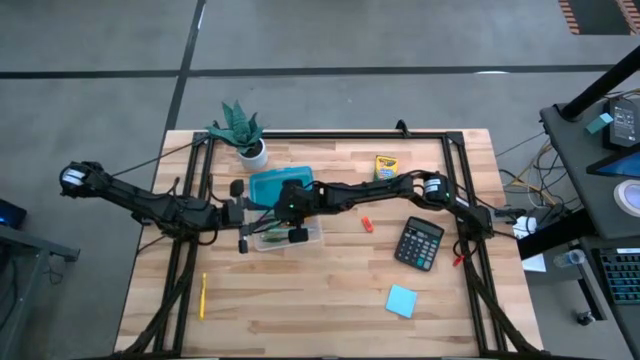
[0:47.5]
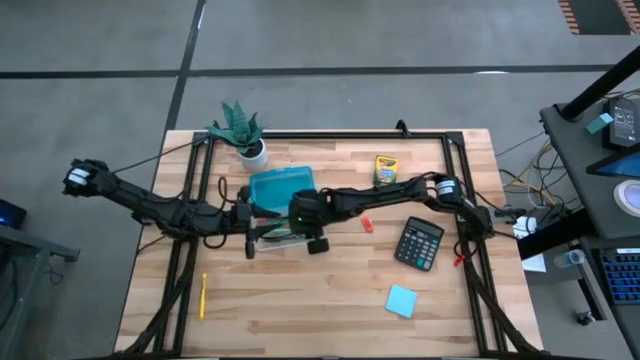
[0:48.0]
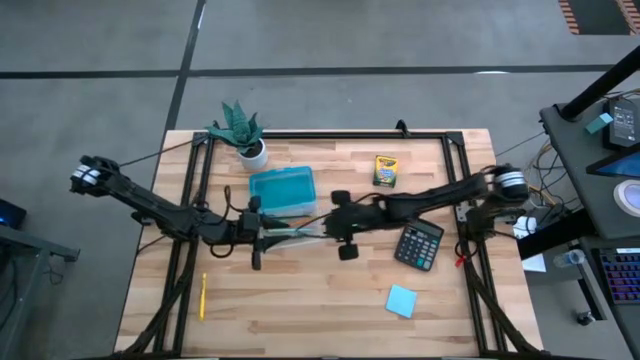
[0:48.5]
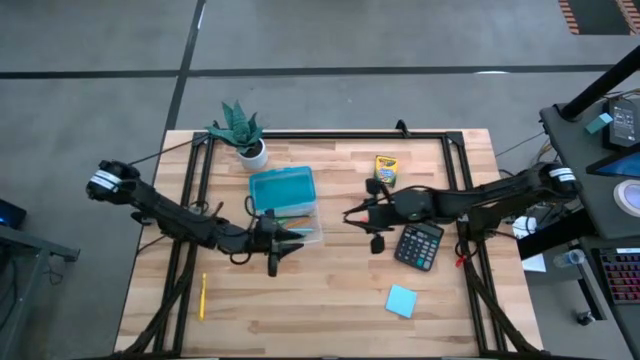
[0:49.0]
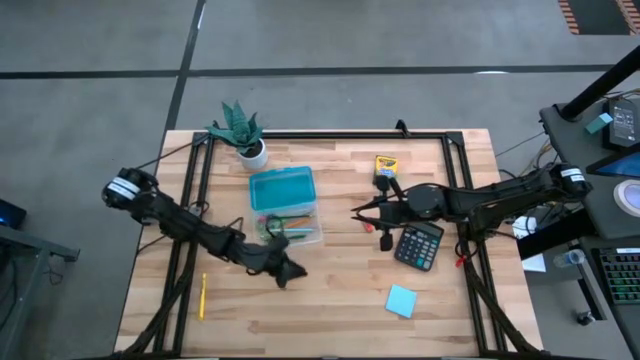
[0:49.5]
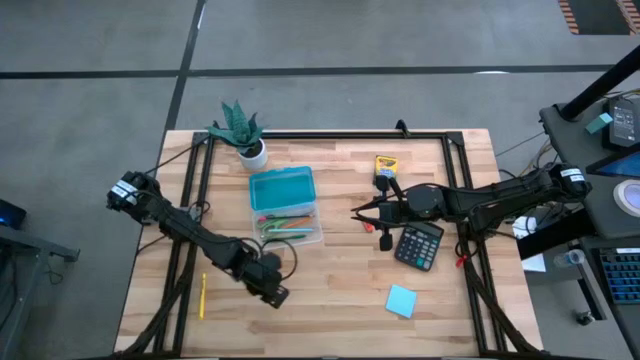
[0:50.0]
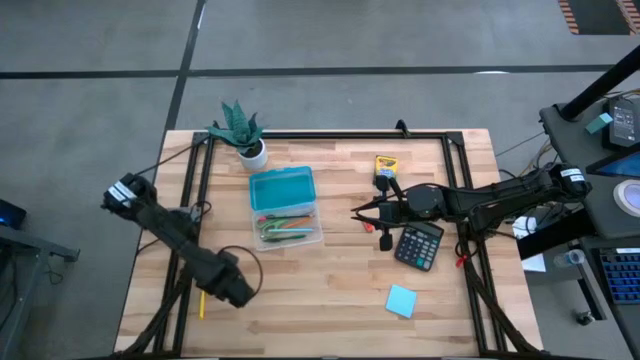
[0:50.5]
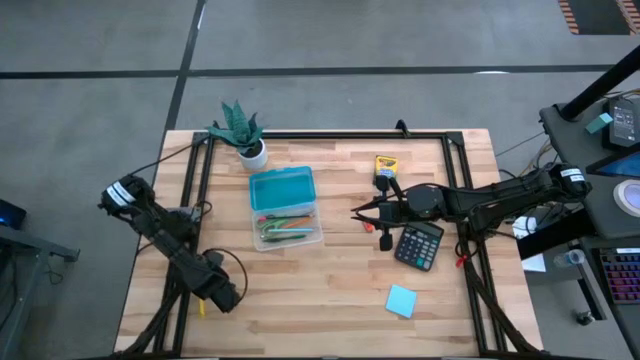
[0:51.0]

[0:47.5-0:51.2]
Task: Pack school essentials
Put the yellow pen into the blue supply box

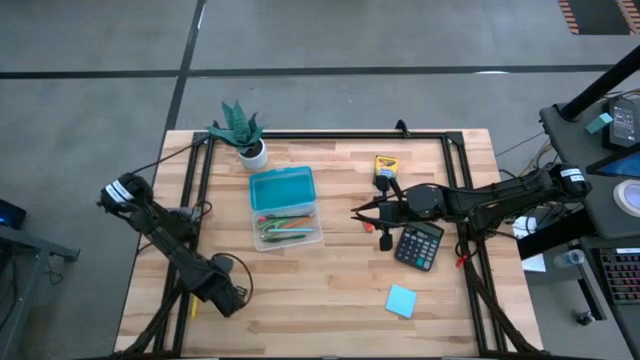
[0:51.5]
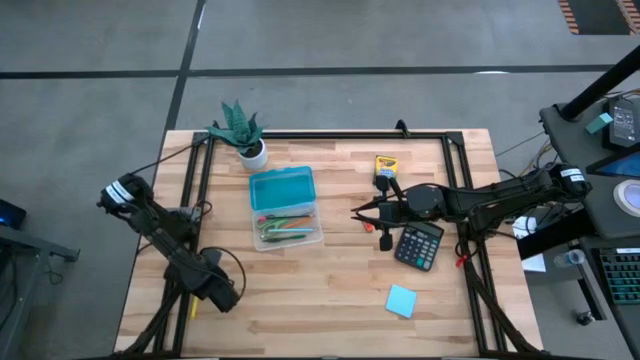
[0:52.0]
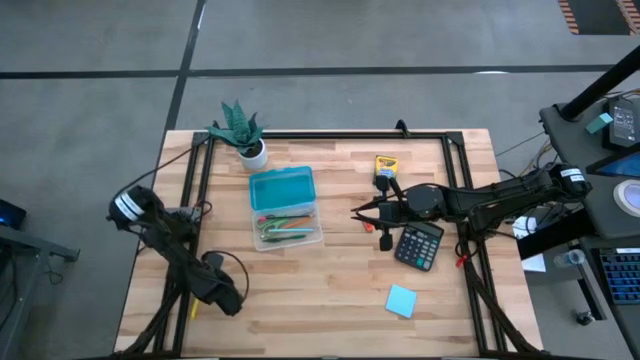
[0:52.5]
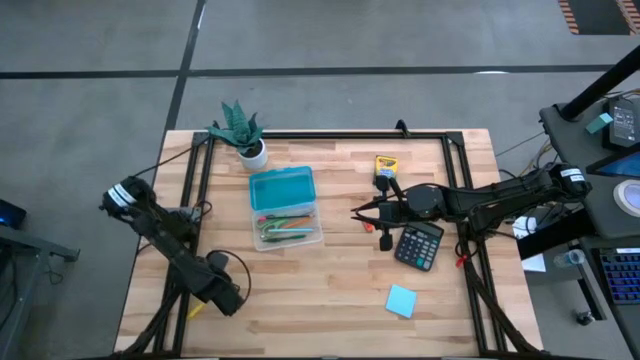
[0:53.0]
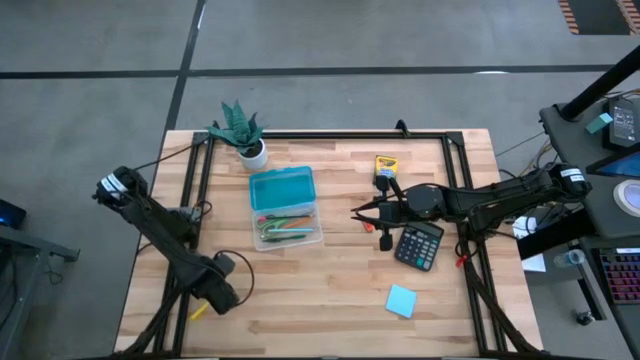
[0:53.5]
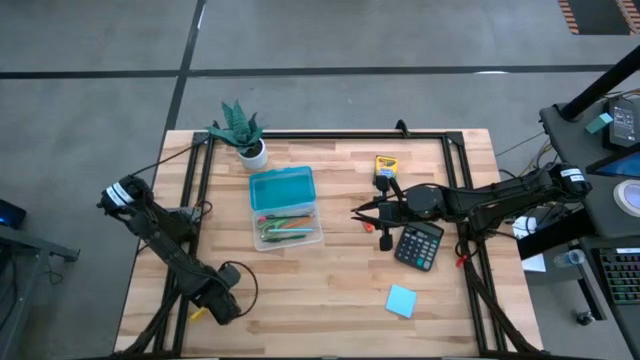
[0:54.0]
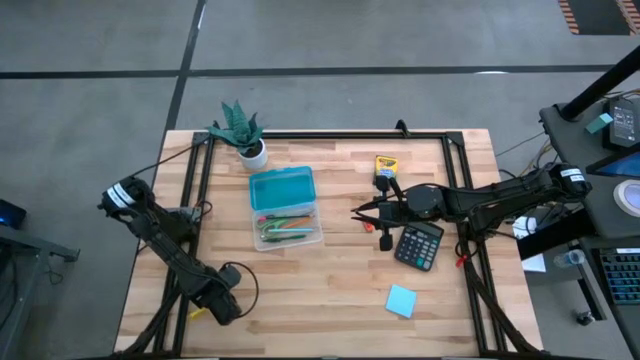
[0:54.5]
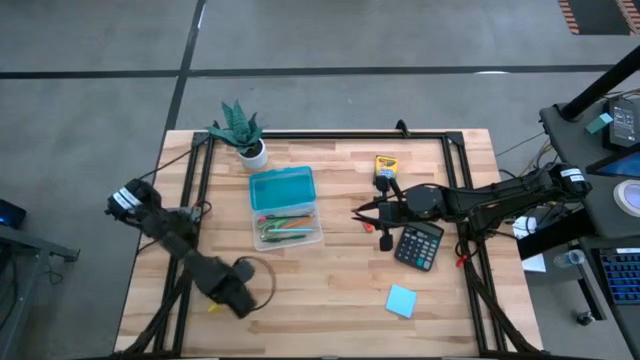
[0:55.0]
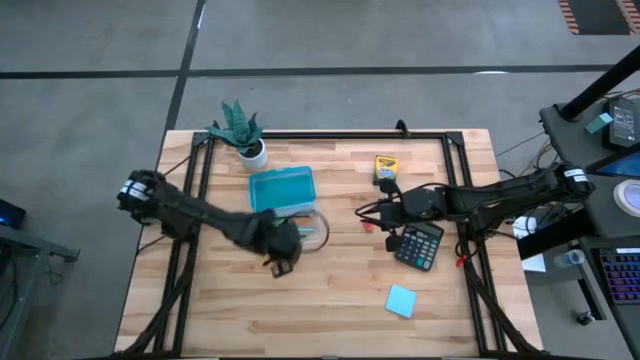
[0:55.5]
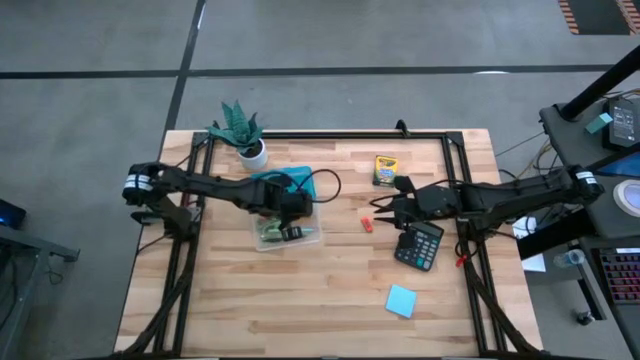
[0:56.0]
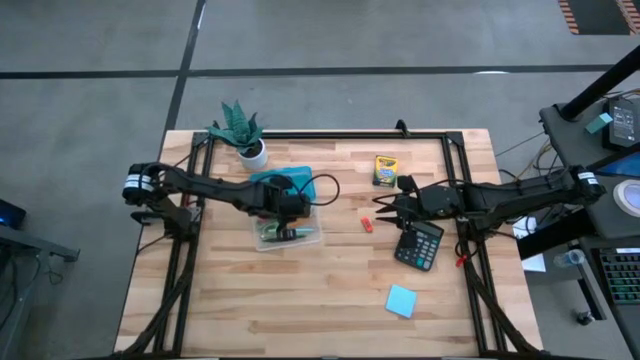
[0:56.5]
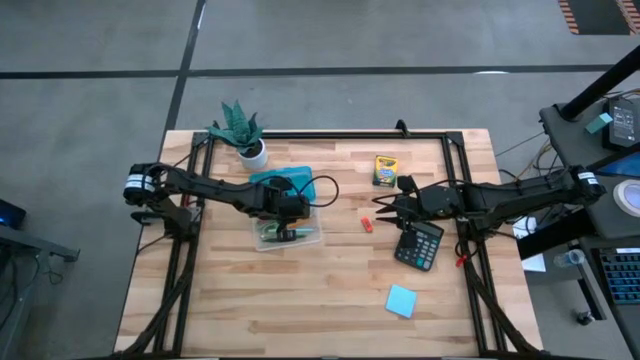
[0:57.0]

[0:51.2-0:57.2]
Put the yellow pen into the blue supply box

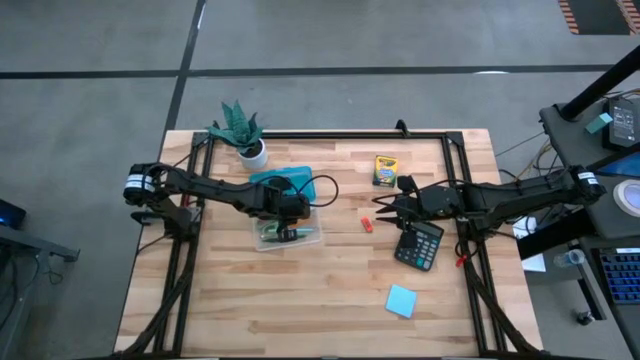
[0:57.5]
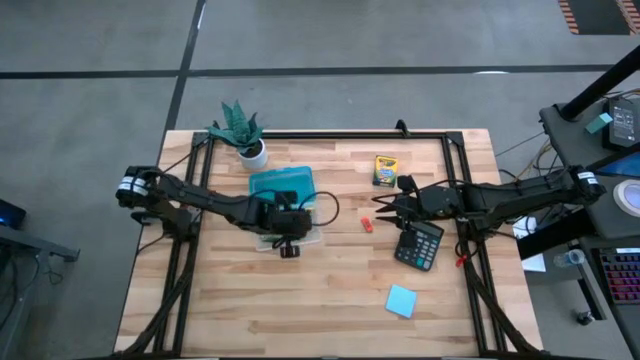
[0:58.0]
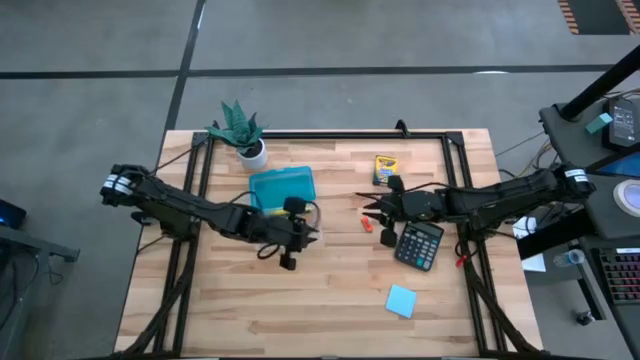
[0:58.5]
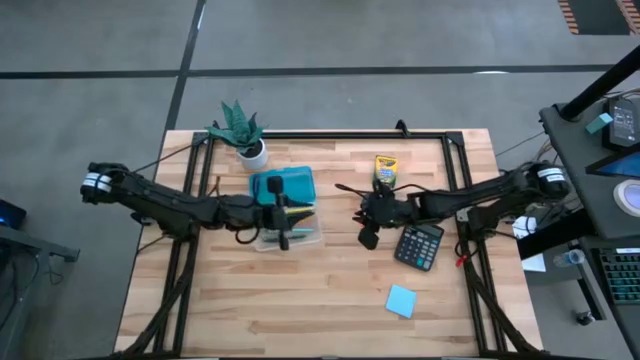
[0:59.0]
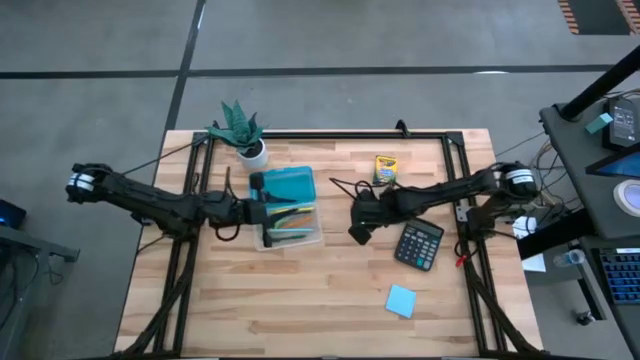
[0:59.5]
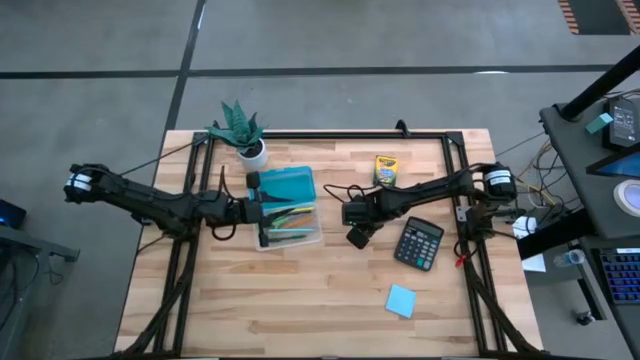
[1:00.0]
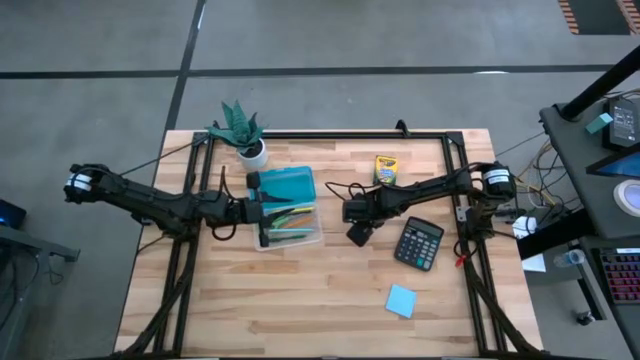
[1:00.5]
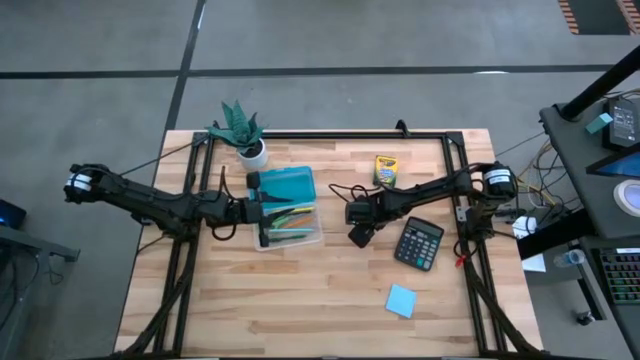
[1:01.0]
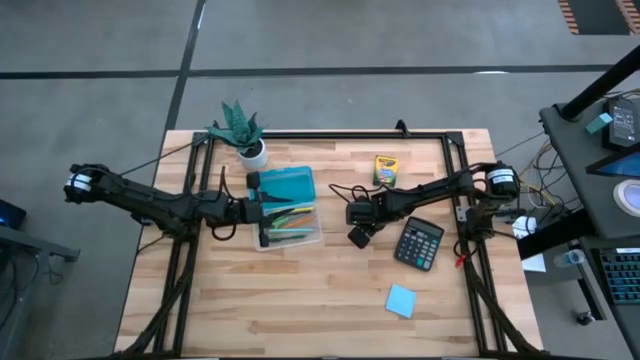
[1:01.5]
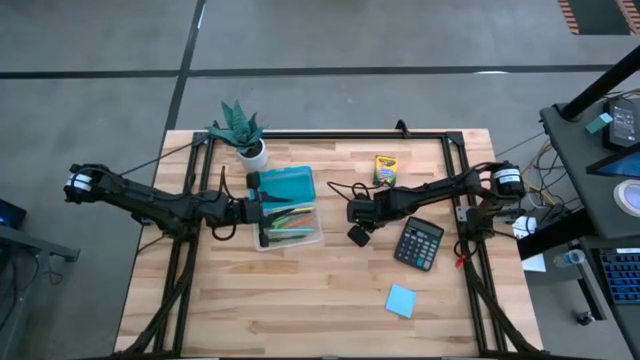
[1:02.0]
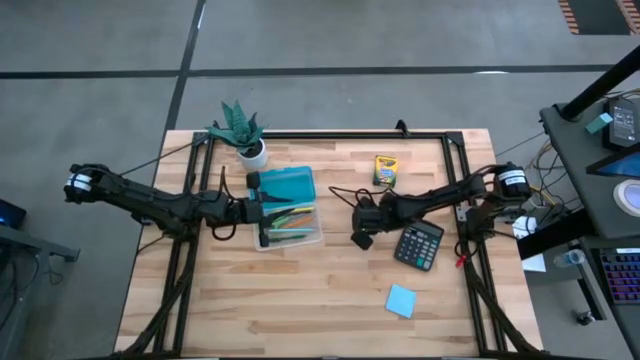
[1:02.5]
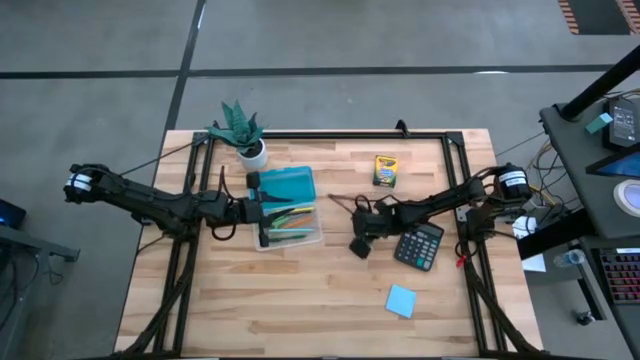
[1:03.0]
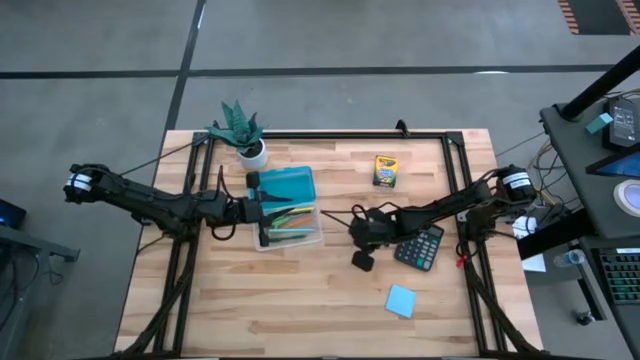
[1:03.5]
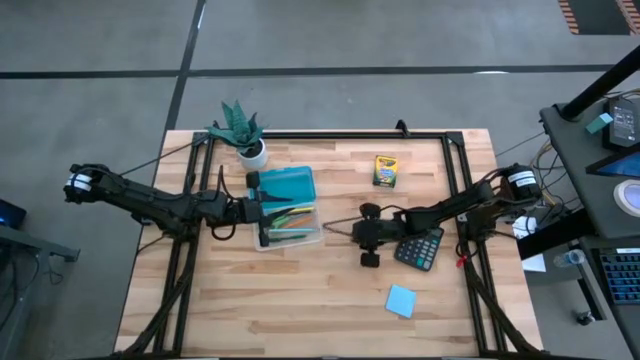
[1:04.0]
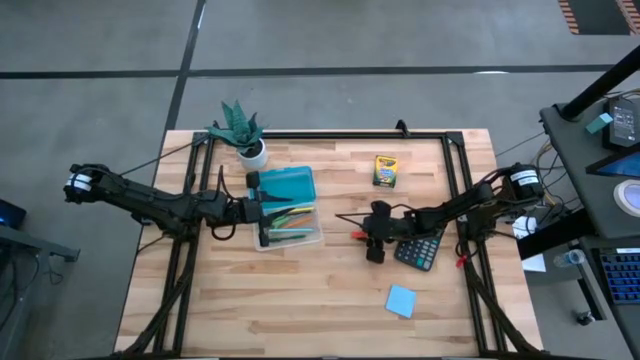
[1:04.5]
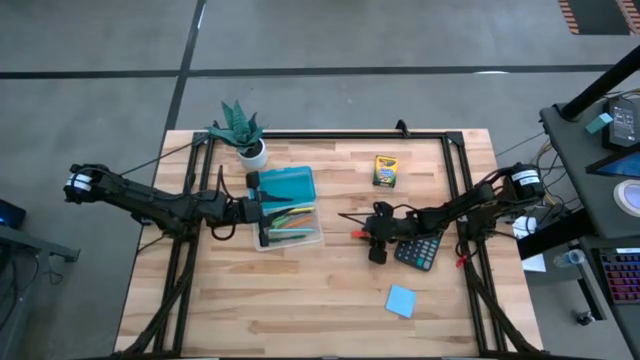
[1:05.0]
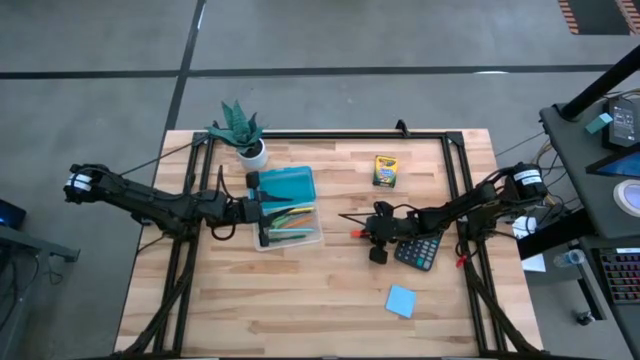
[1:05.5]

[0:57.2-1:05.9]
Put the orange eraser into the blue supply box

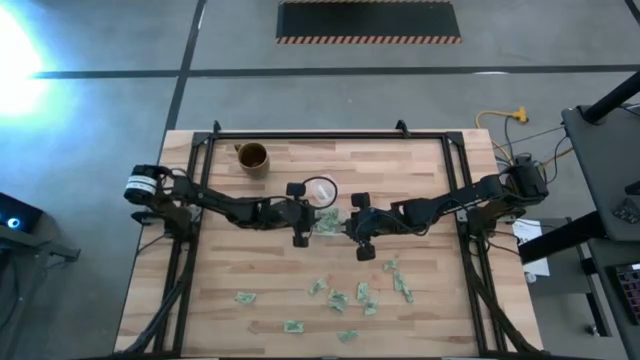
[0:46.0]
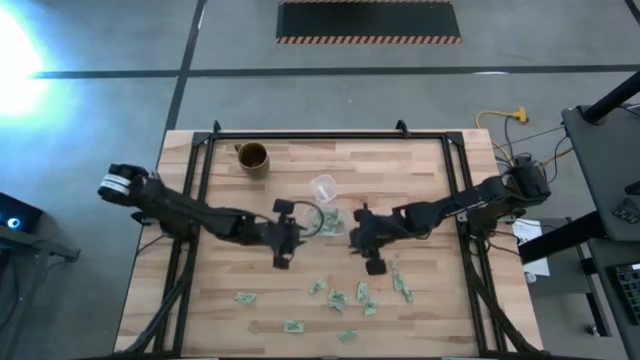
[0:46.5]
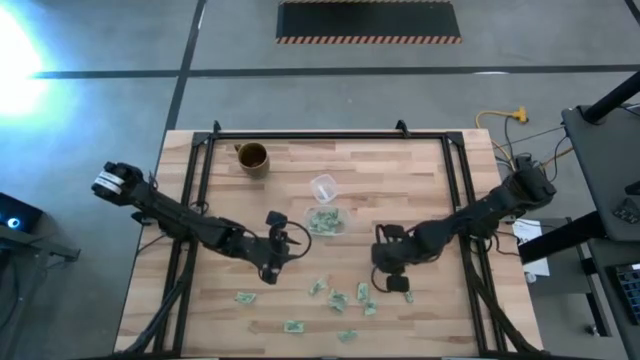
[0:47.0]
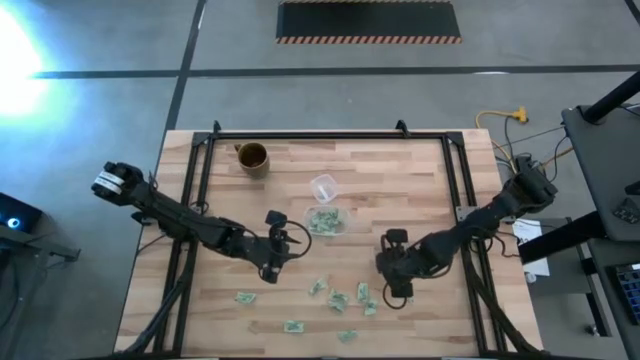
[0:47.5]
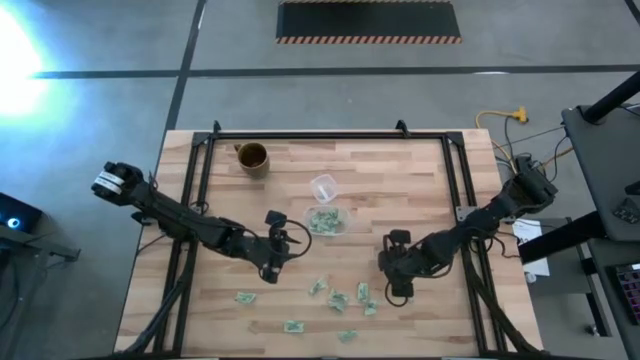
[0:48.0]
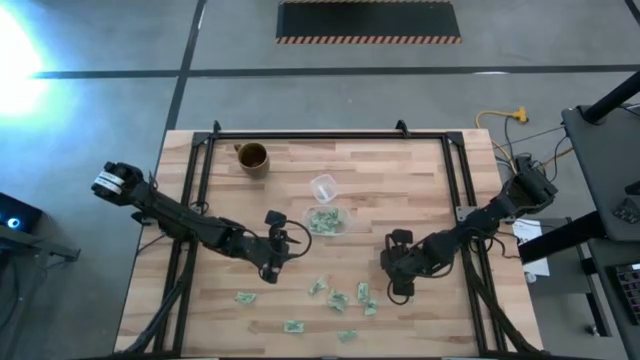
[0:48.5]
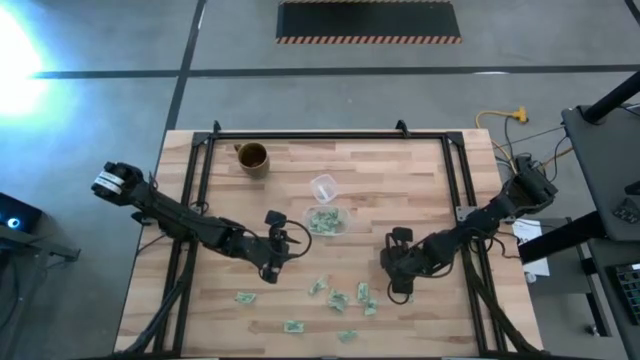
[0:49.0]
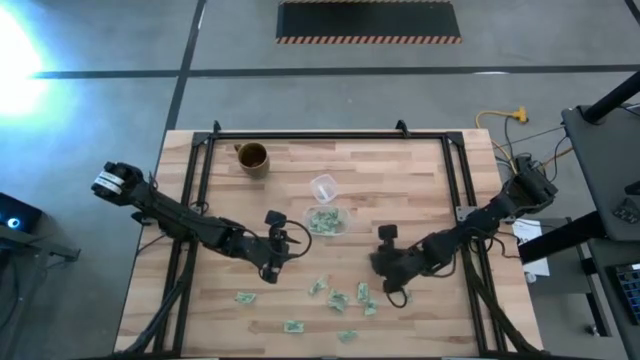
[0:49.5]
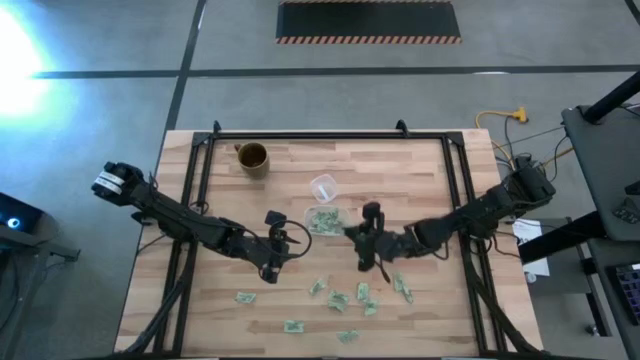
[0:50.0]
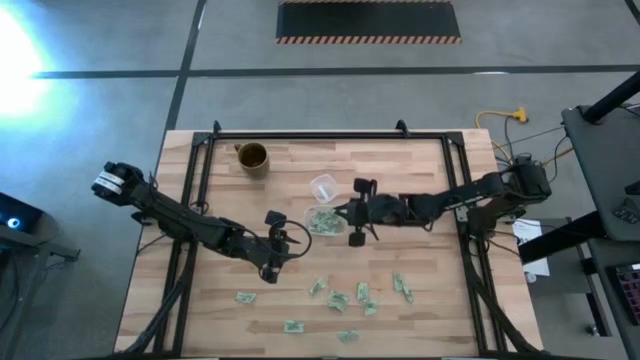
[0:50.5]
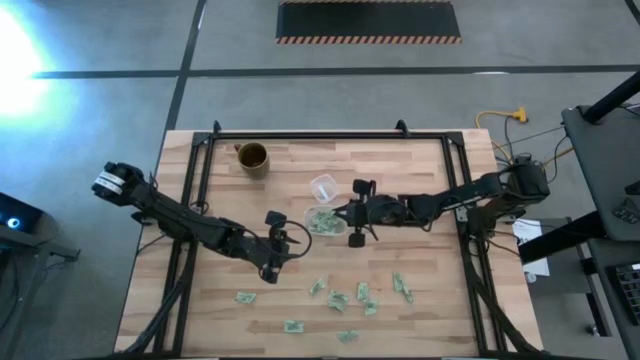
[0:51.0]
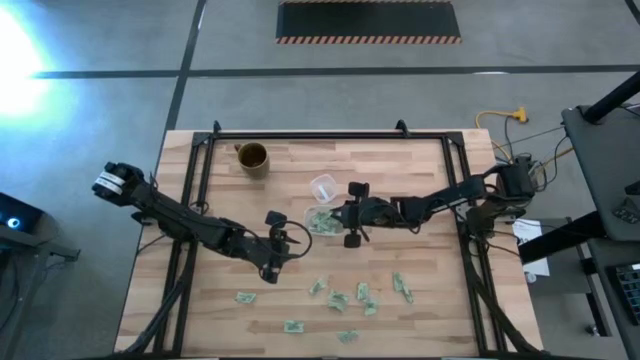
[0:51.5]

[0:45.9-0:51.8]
Task: Pick and place Stevia / Truvia into bins
Put the stevia packet into the bottom transparent container
